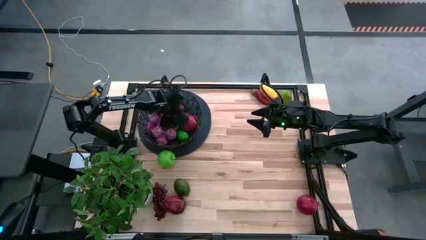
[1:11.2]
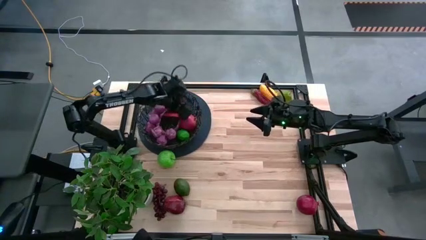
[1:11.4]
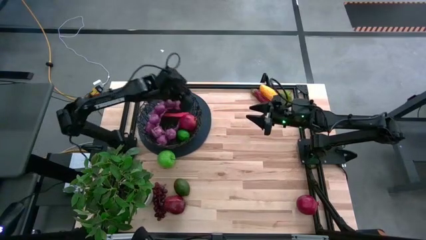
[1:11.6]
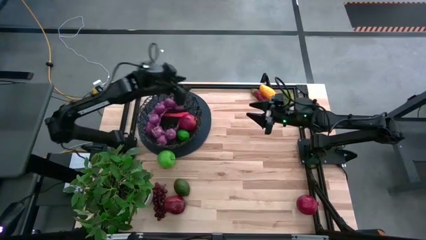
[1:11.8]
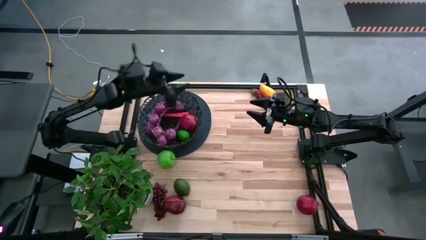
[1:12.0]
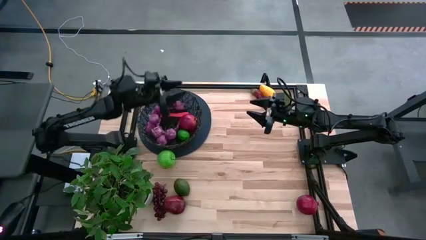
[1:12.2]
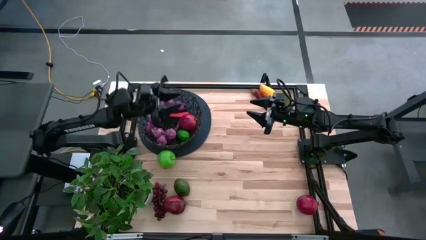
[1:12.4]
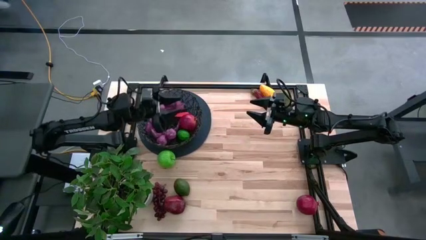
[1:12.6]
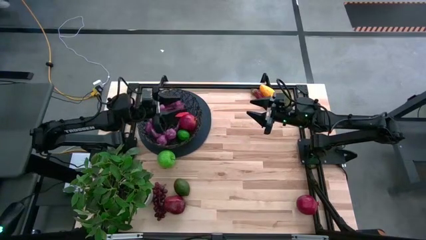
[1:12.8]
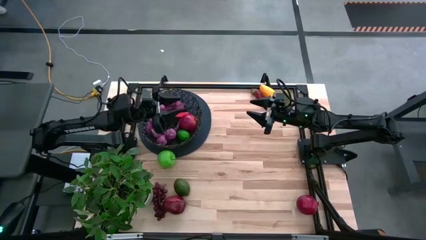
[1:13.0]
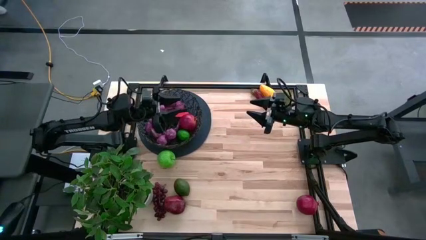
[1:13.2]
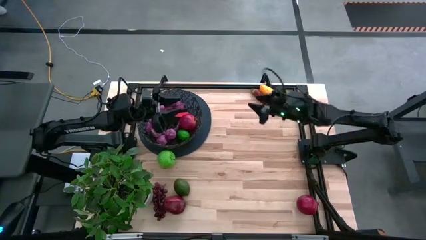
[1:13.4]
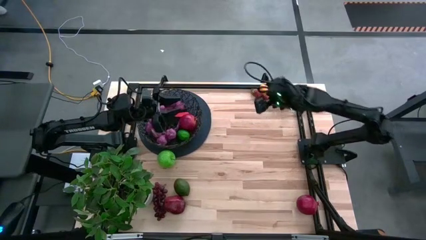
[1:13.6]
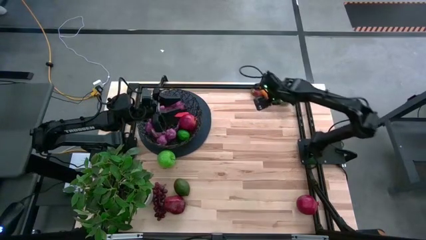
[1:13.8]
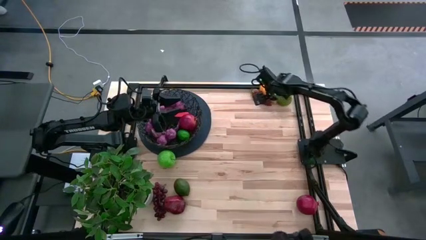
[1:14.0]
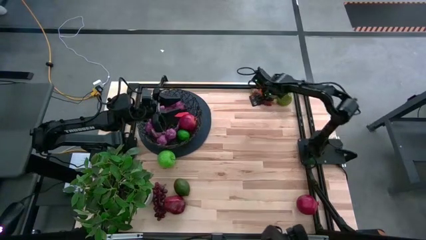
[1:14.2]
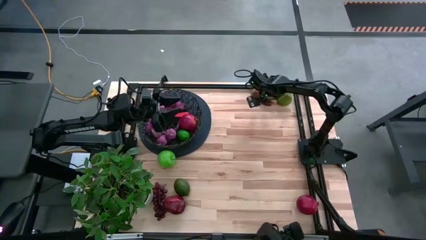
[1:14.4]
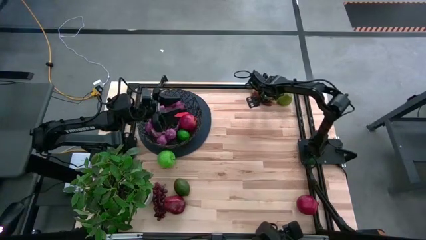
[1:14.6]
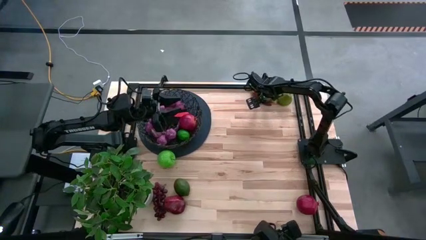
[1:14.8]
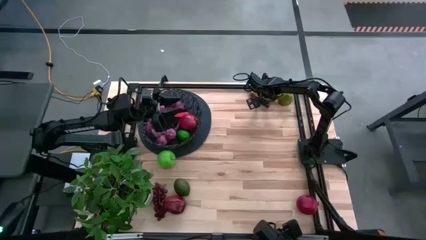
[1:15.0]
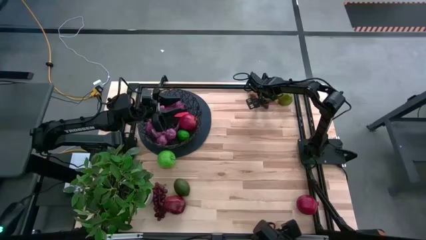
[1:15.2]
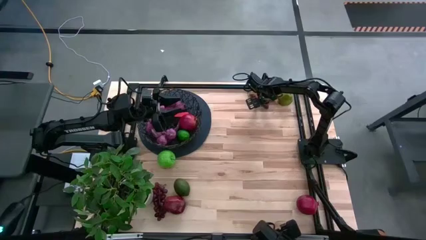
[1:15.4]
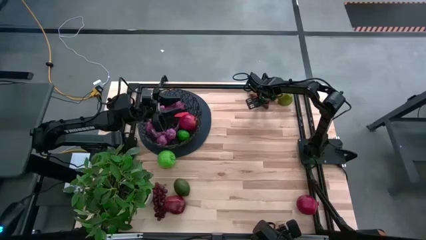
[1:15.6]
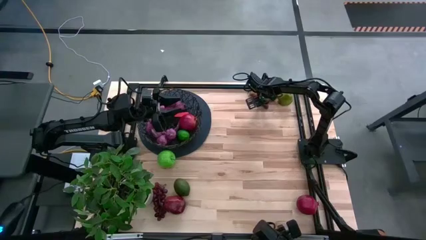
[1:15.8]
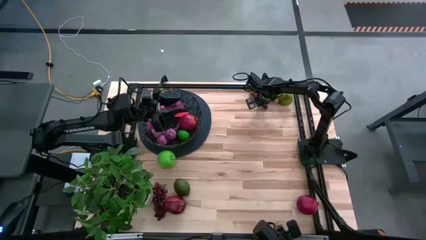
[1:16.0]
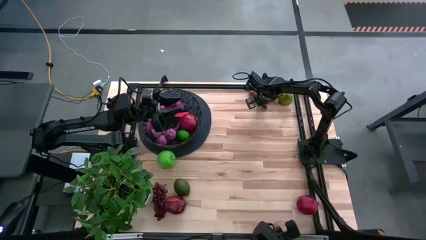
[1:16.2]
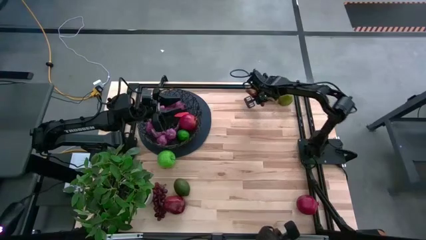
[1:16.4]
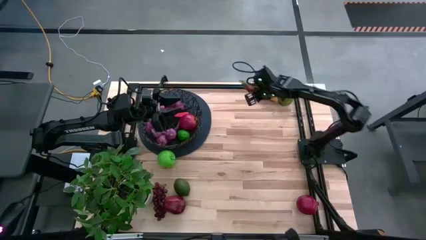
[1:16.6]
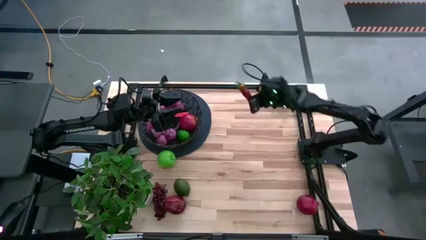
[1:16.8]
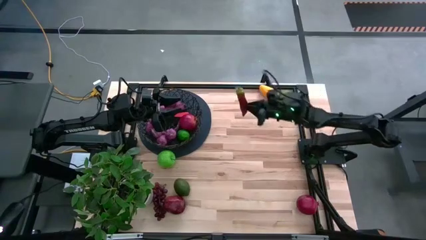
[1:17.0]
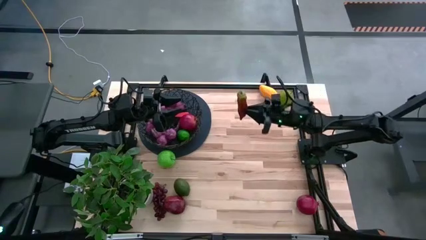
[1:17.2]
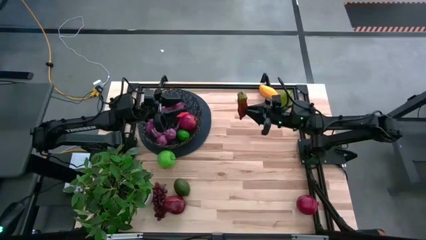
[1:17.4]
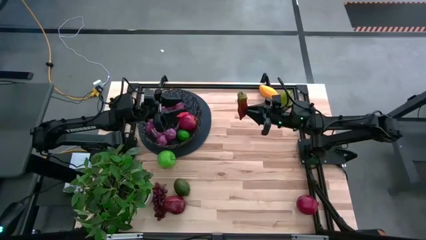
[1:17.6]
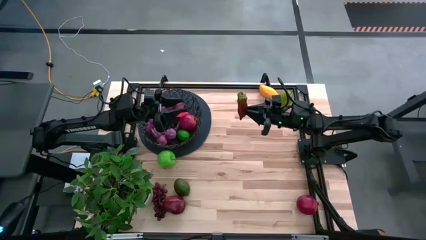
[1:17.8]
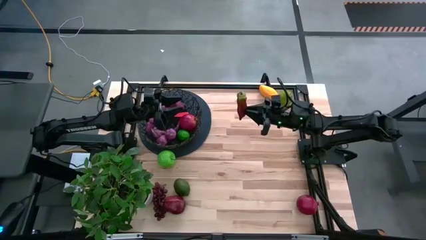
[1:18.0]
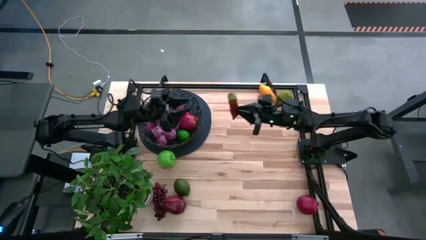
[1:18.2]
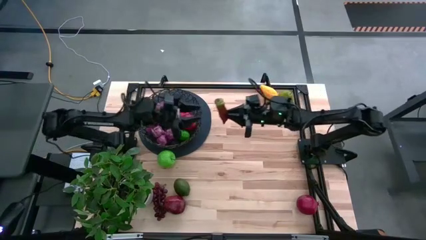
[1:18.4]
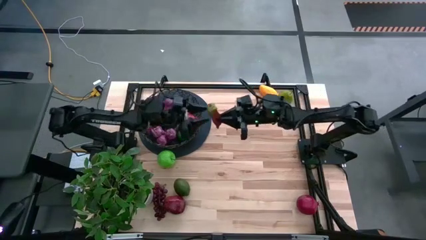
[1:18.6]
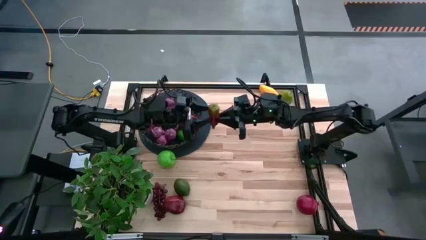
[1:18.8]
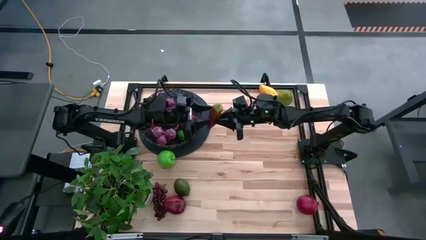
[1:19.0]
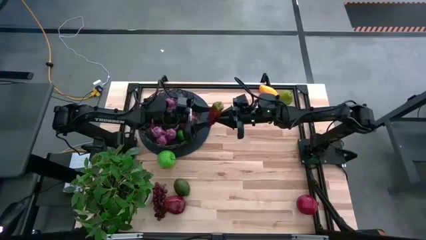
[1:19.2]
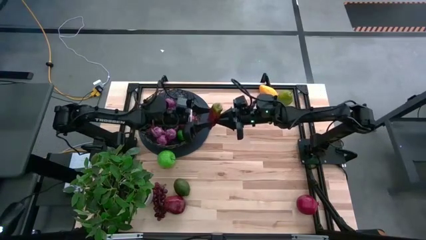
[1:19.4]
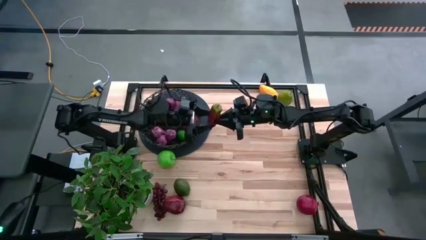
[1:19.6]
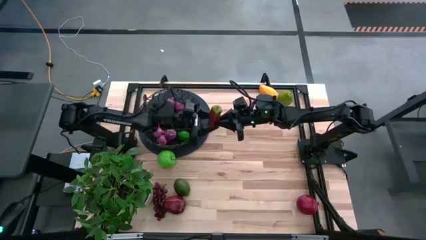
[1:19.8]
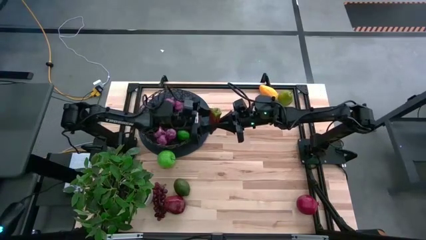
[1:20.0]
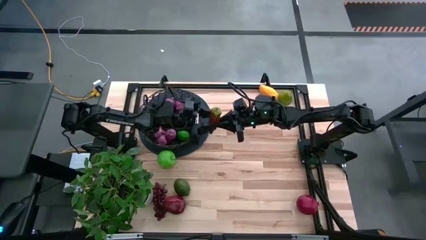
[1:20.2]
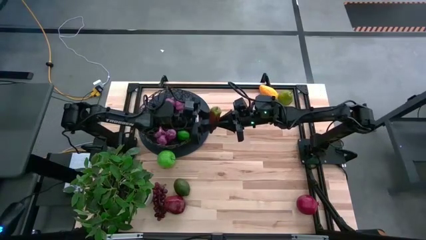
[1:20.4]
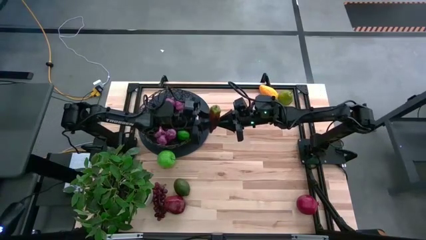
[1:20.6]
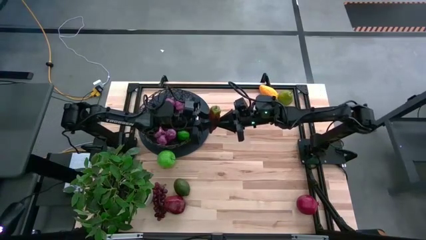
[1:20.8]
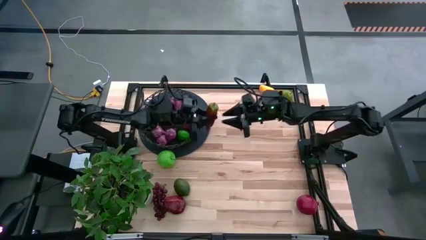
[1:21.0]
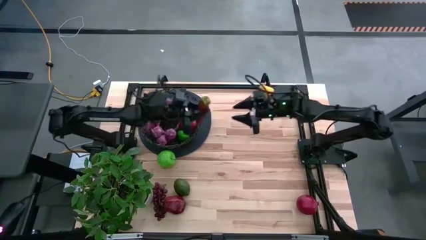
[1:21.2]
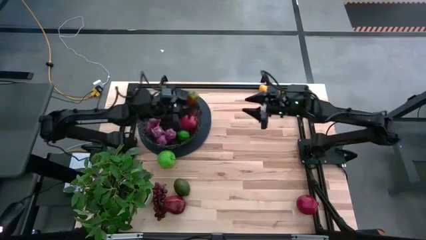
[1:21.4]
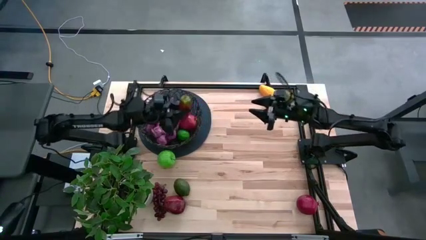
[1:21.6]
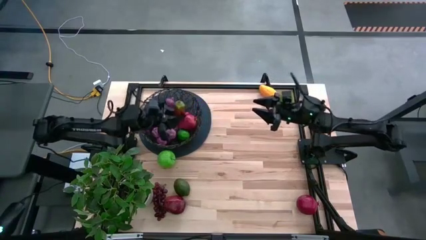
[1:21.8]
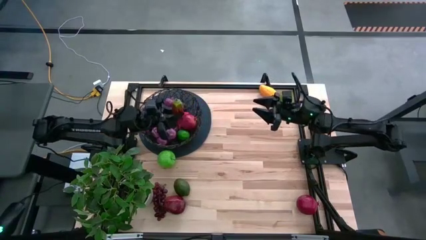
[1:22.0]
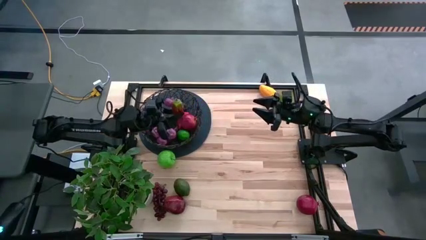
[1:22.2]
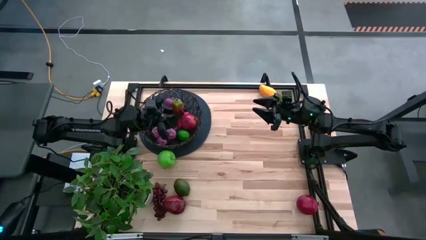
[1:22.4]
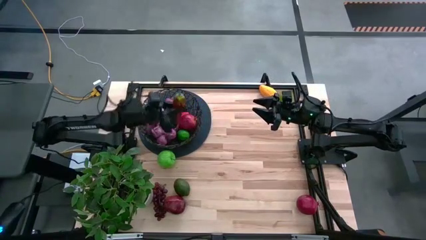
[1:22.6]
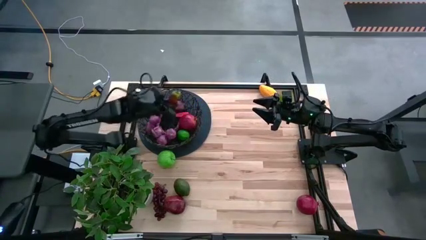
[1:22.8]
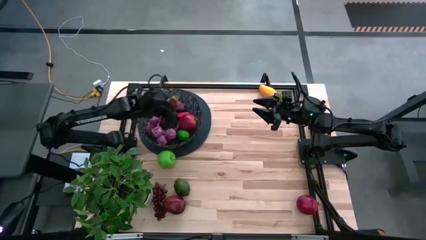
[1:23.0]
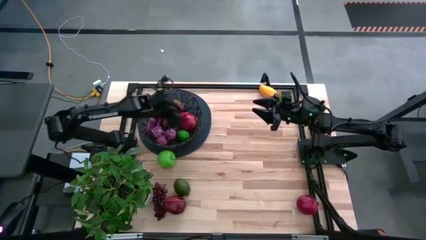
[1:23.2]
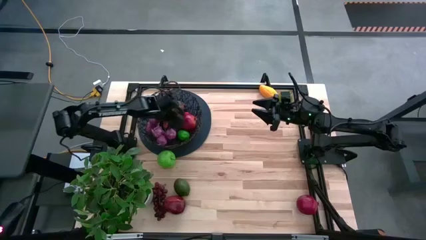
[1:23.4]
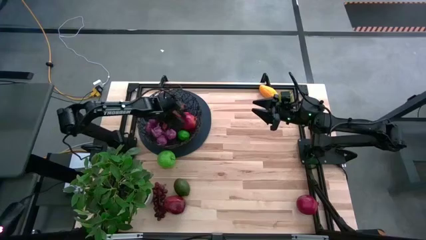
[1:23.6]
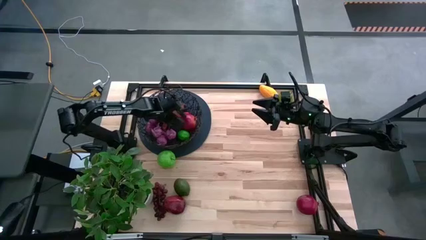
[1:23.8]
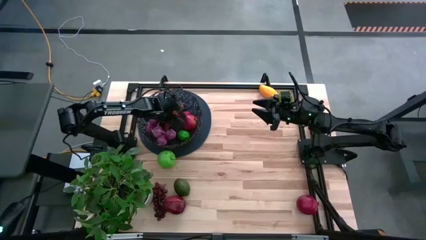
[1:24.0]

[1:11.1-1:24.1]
Task: Build produce basket
Put the chili pepper into the wire basket

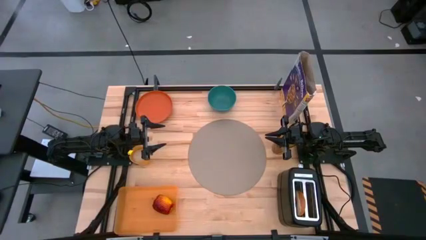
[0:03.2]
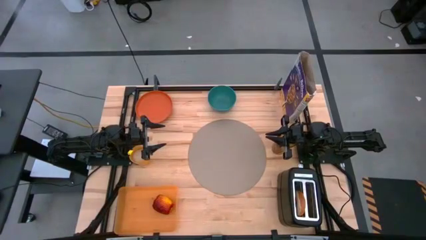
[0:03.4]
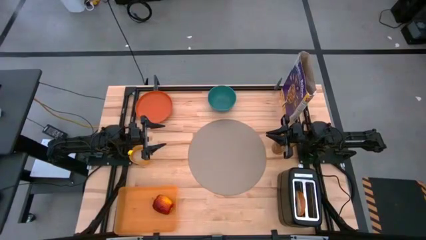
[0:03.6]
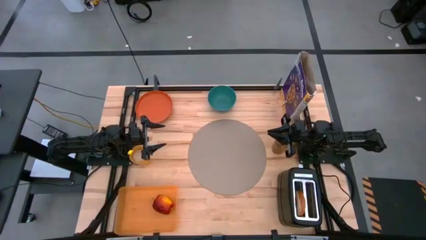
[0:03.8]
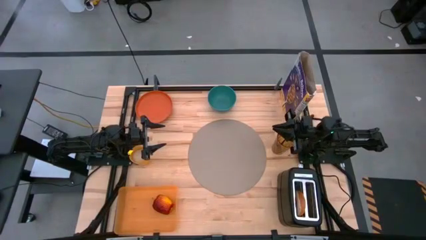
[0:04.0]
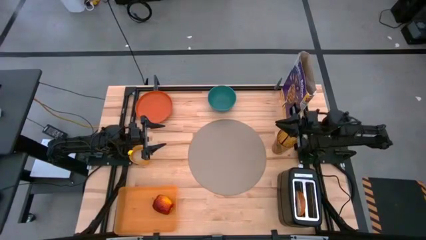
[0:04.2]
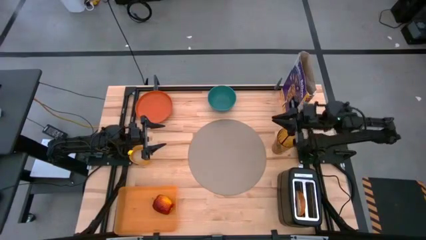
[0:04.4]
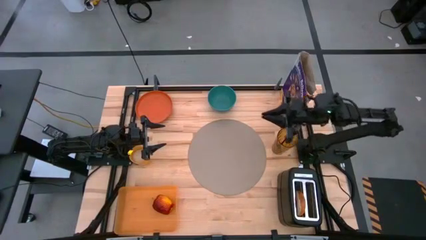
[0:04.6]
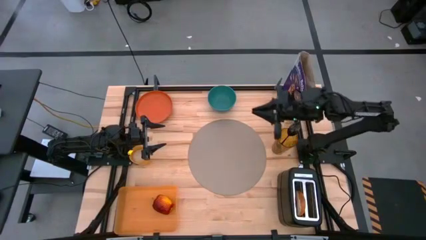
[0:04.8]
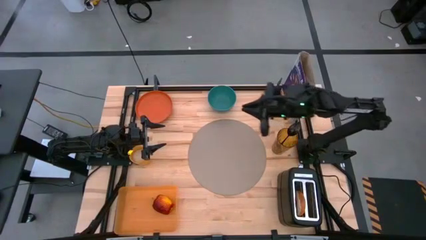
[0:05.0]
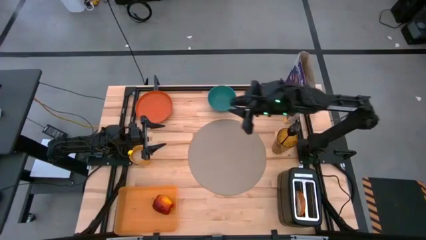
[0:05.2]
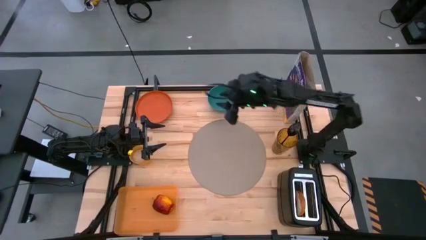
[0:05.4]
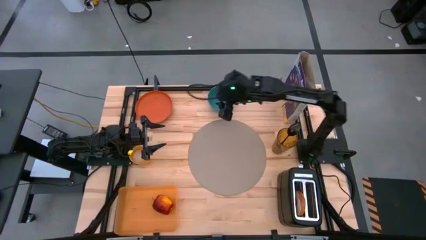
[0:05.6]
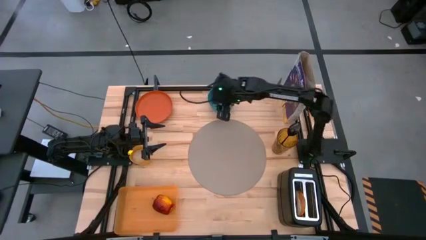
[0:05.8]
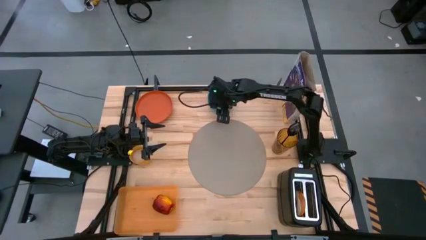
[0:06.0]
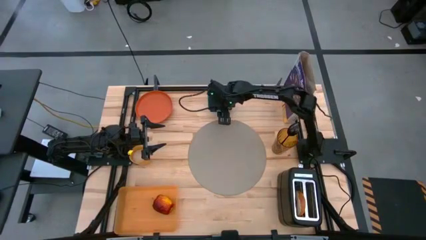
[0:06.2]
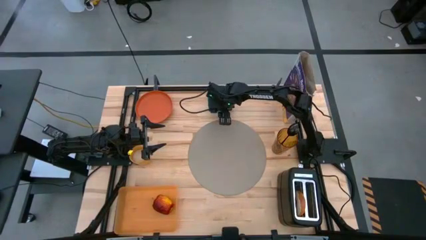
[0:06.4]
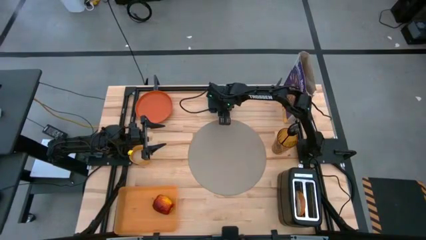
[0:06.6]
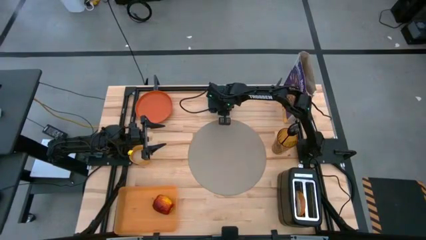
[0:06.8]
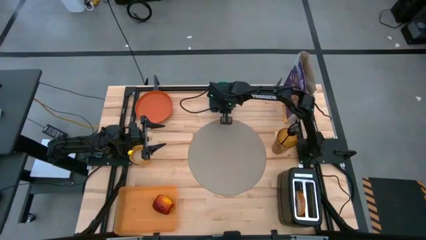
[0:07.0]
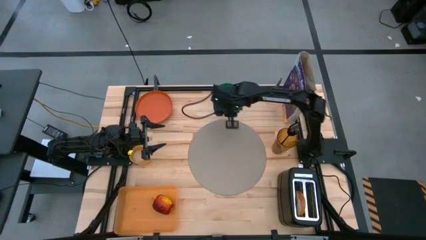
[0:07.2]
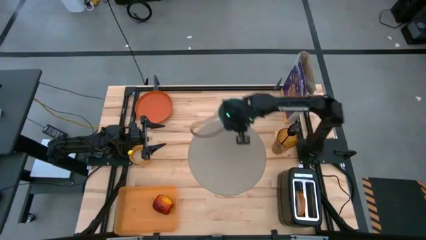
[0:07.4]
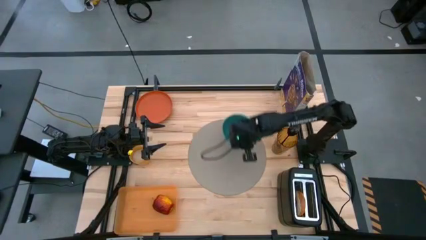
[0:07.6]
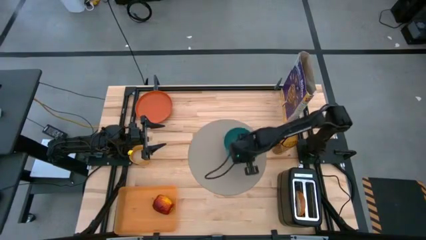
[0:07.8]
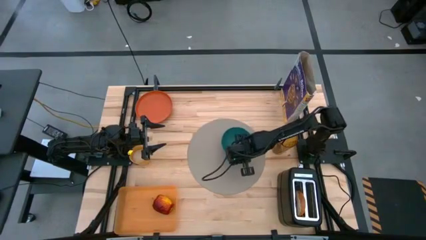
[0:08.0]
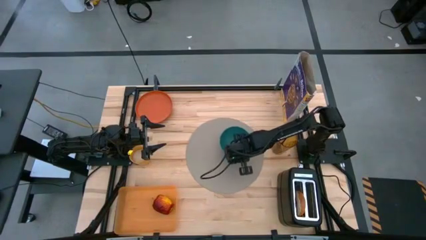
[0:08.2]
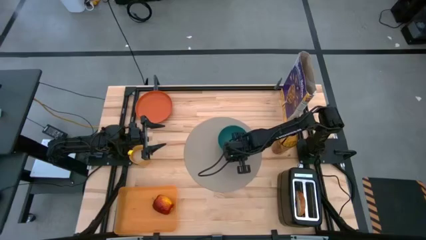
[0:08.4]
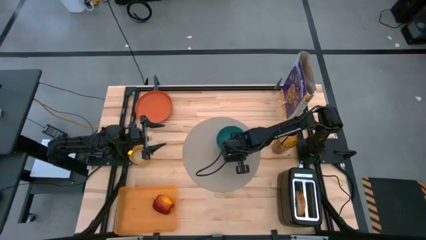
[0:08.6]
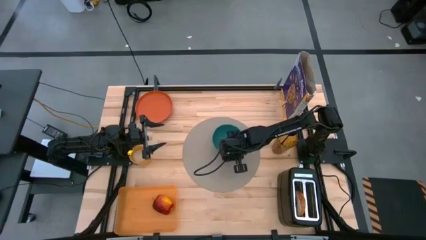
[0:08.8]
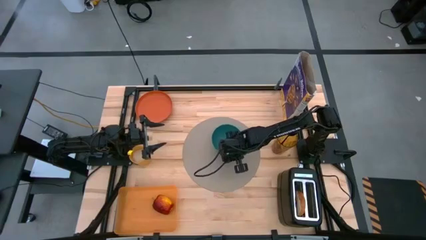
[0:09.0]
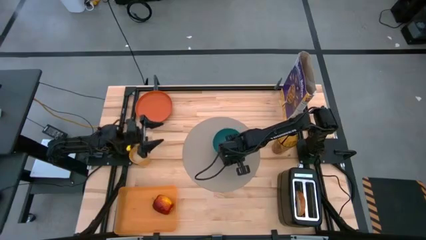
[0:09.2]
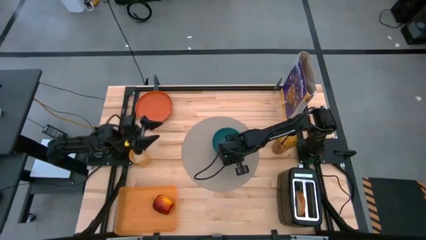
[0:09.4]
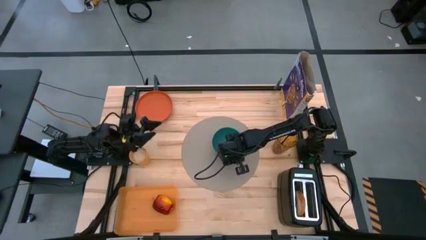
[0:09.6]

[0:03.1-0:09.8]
Task: Arrange a breakfast setting
Put the blue bowl on the placemat
